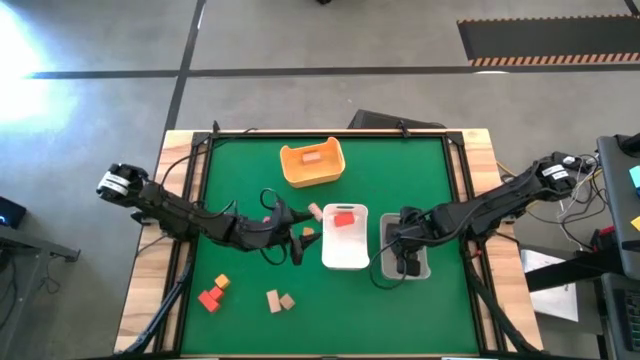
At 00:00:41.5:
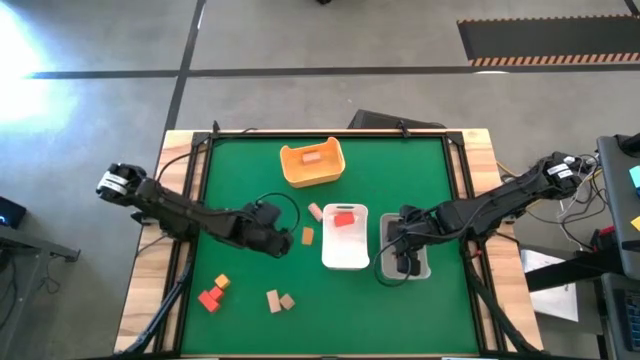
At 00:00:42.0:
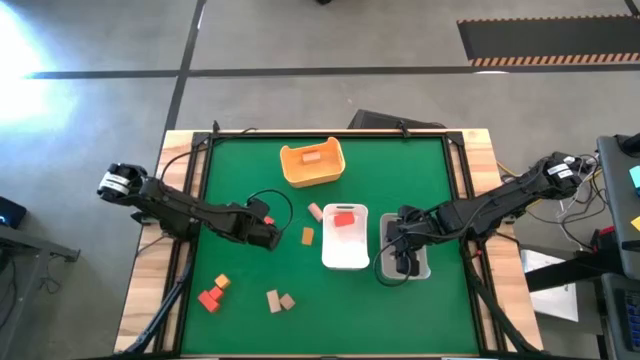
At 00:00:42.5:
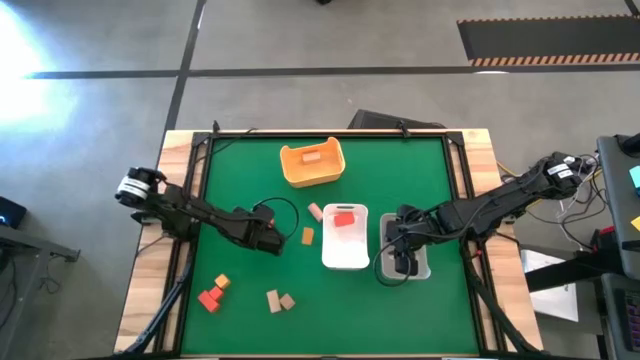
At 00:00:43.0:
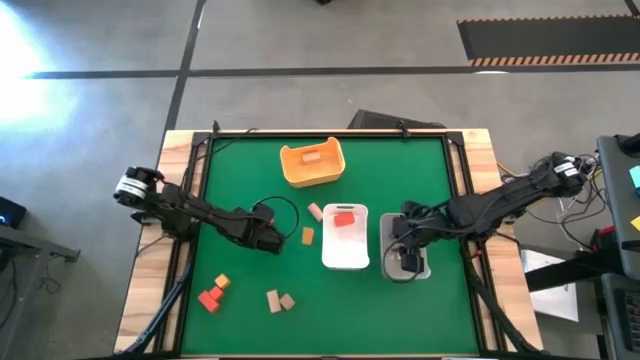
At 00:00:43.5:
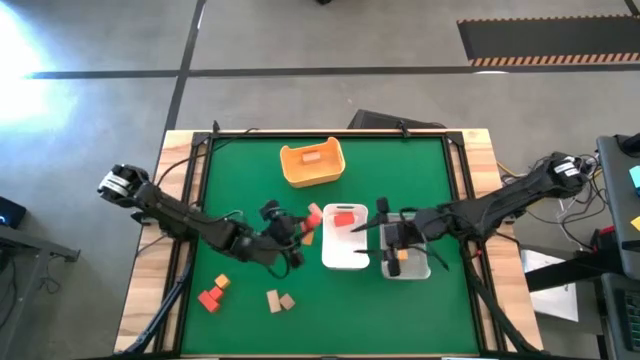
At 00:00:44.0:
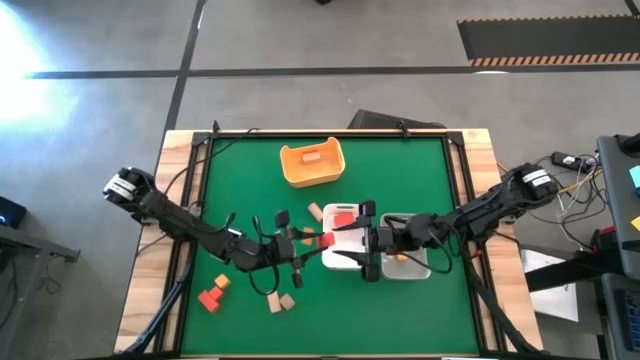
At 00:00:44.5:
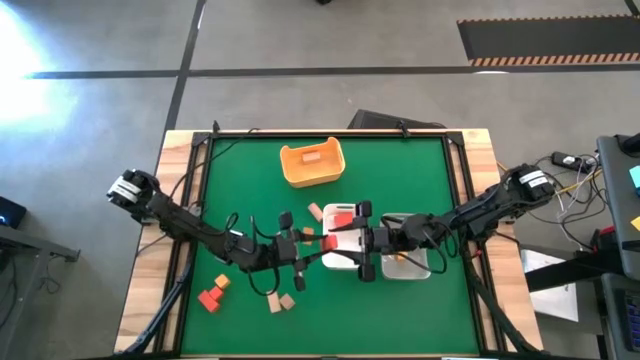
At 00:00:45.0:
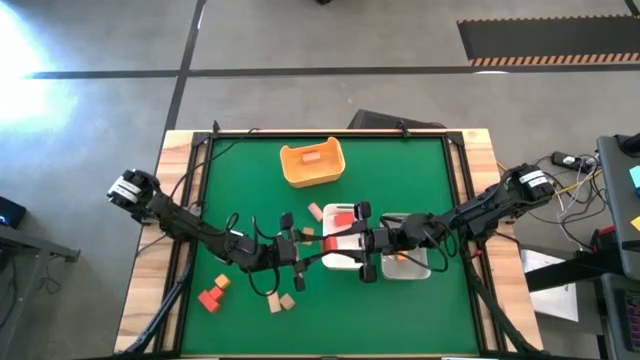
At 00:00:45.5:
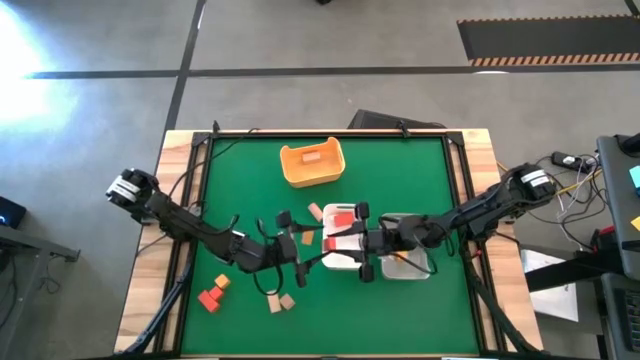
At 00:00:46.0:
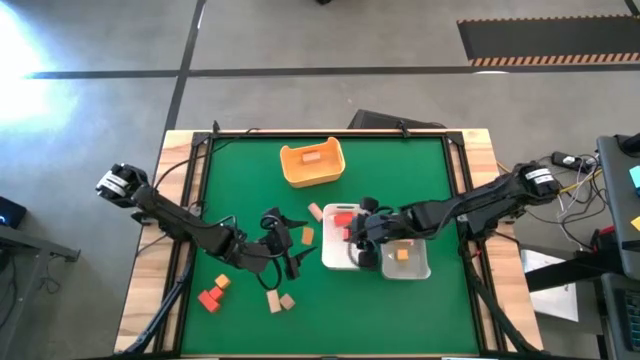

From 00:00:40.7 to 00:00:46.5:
Task: Sort & place blocks by color
Put the red block into the white bin

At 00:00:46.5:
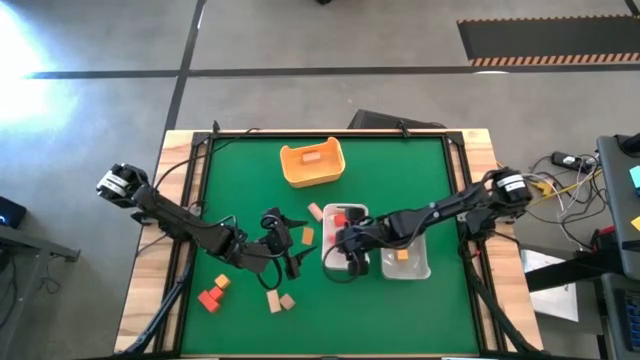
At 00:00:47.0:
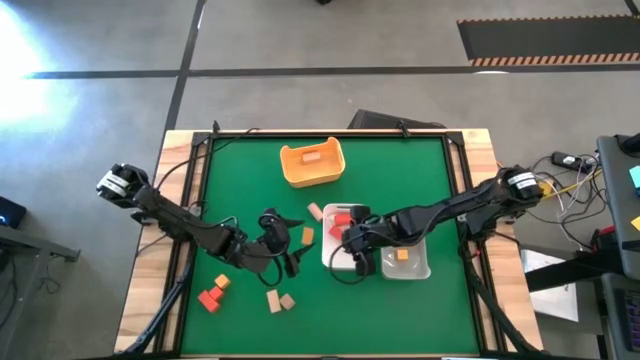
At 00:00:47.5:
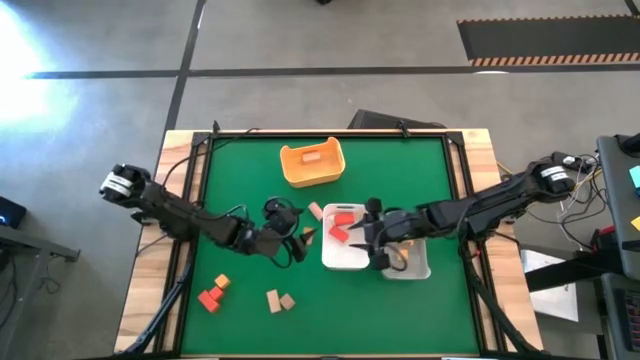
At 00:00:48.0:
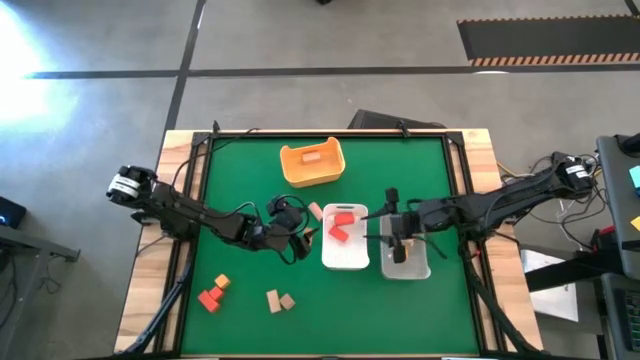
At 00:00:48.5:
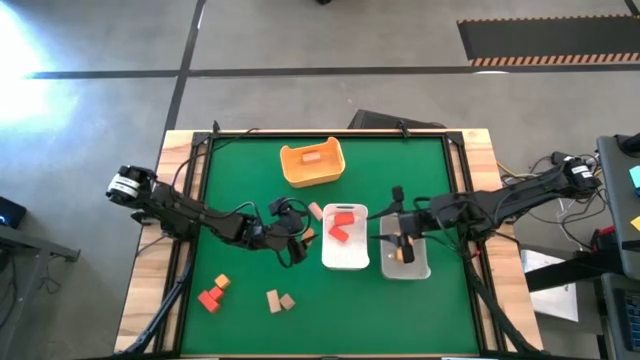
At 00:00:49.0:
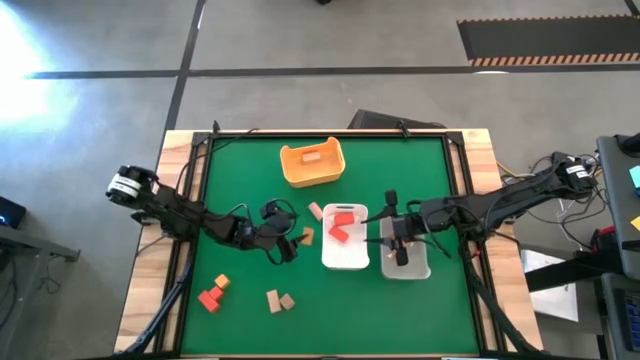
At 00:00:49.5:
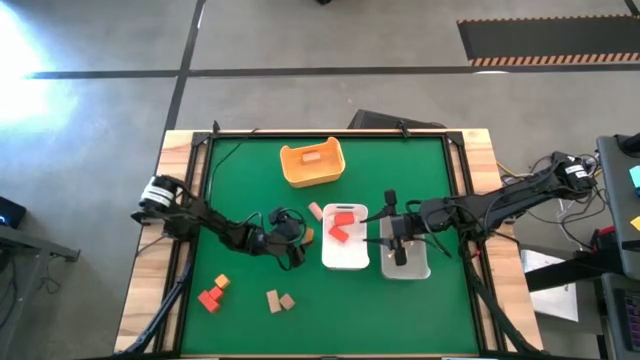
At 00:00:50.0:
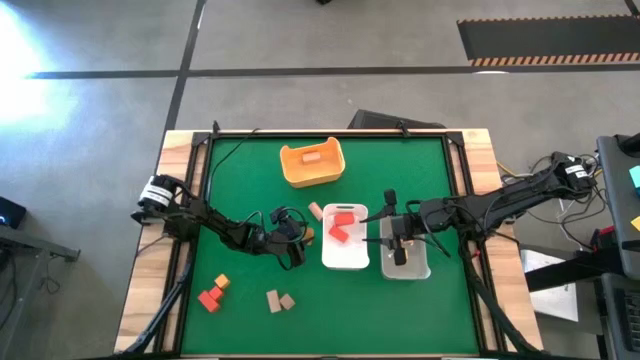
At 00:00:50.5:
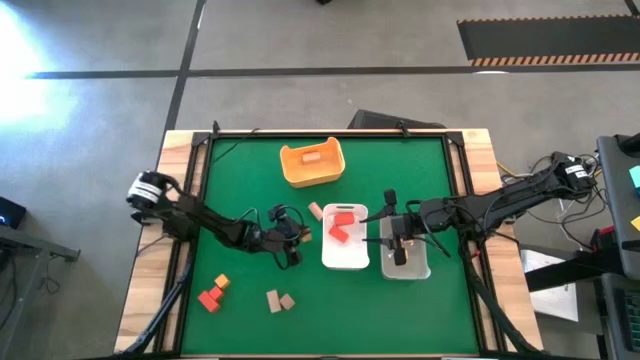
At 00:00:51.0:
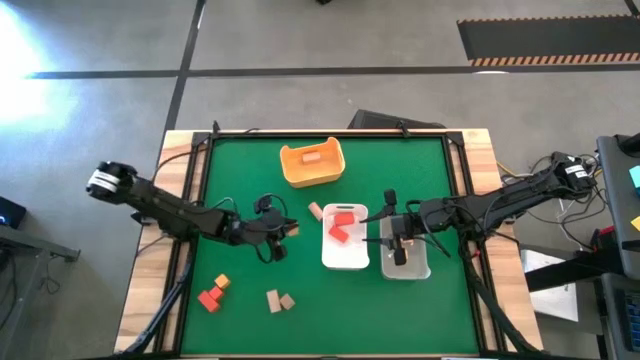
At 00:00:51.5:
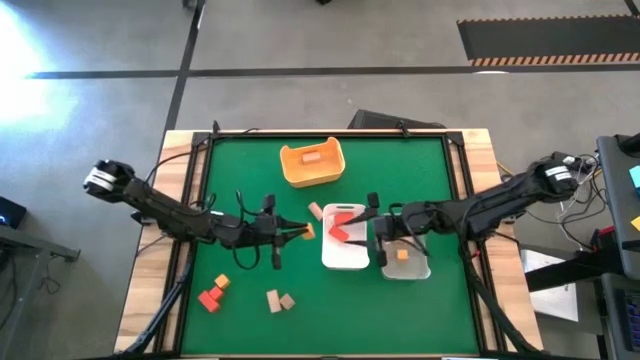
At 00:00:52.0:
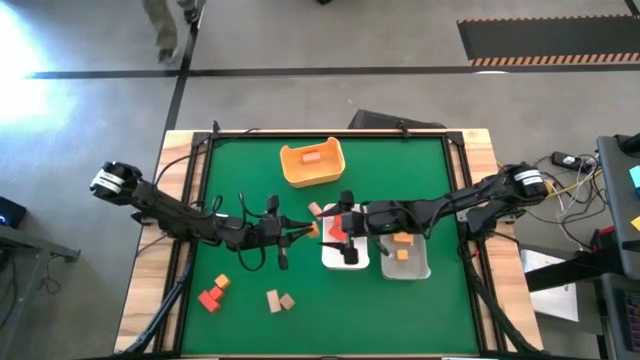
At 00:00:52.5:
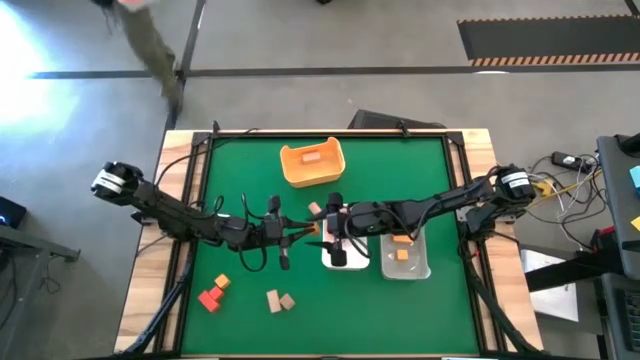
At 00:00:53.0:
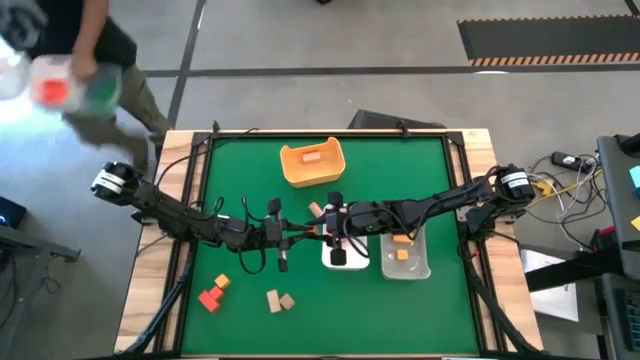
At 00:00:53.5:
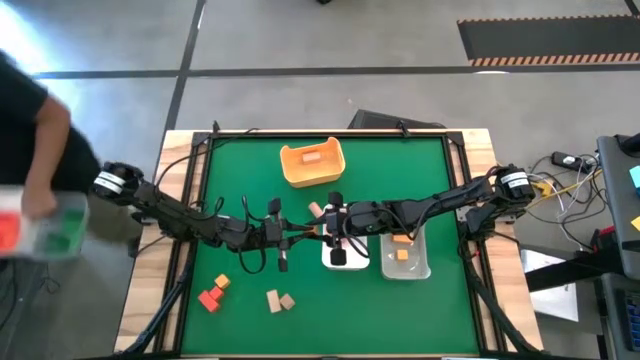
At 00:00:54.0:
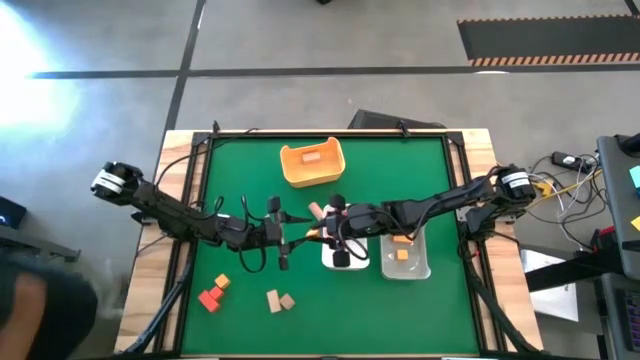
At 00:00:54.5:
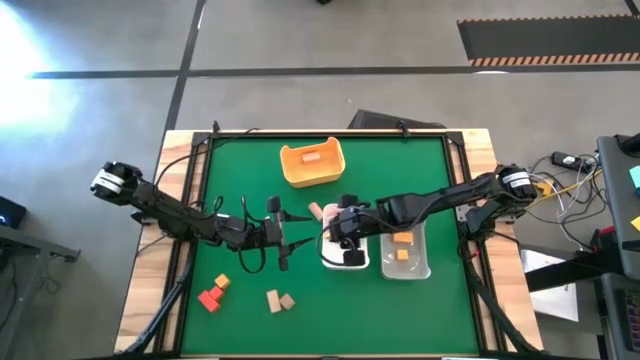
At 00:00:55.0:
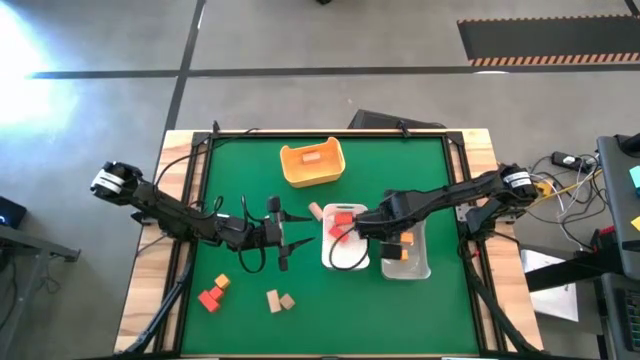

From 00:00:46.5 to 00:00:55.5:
Put the yellow block into the gray bin

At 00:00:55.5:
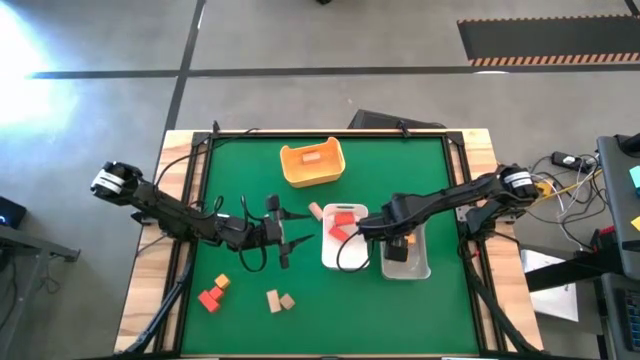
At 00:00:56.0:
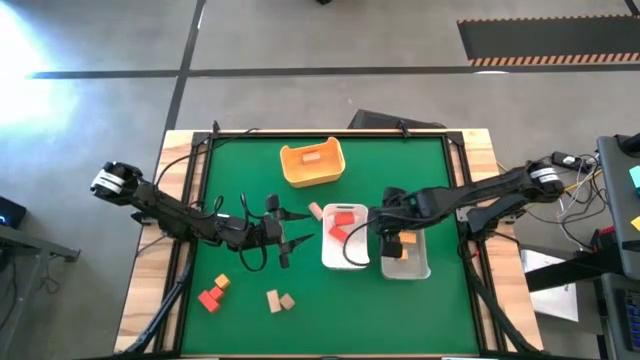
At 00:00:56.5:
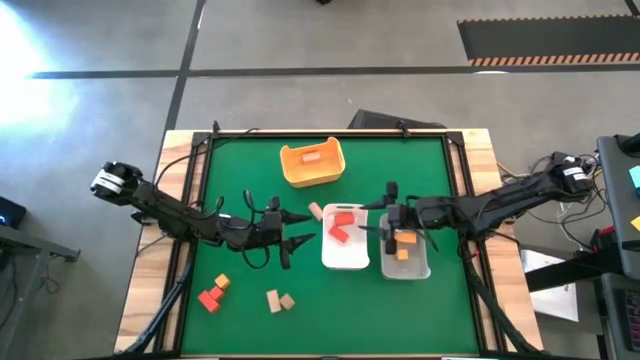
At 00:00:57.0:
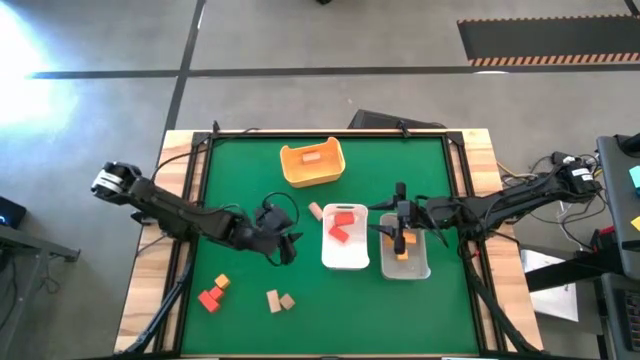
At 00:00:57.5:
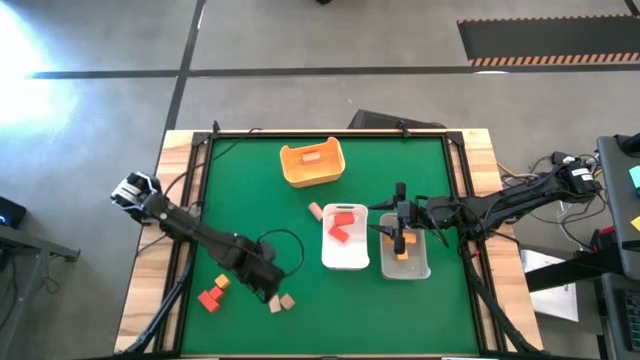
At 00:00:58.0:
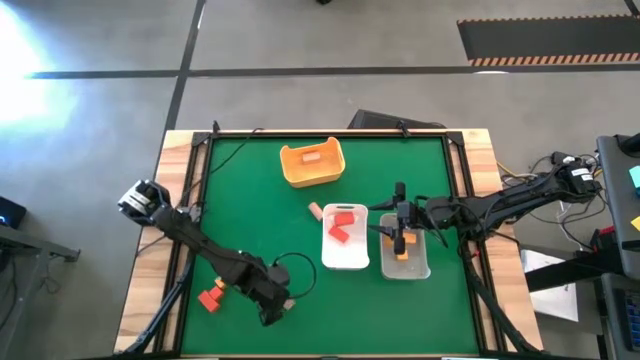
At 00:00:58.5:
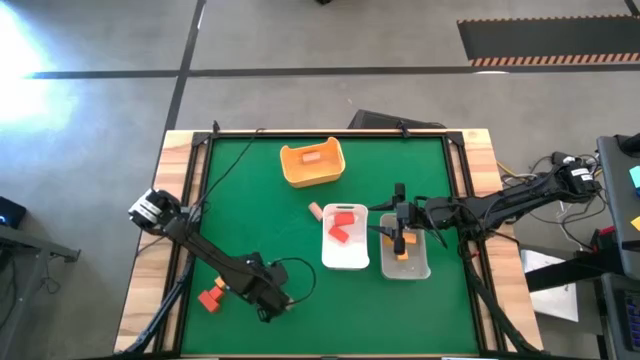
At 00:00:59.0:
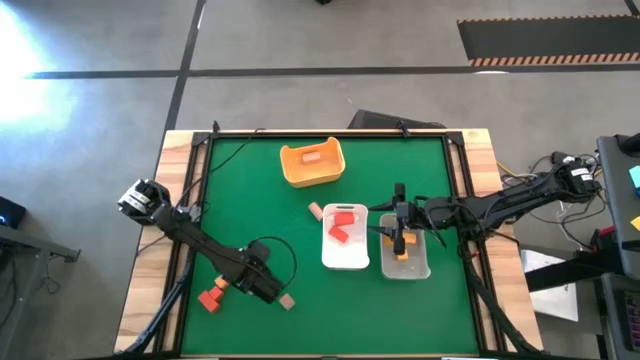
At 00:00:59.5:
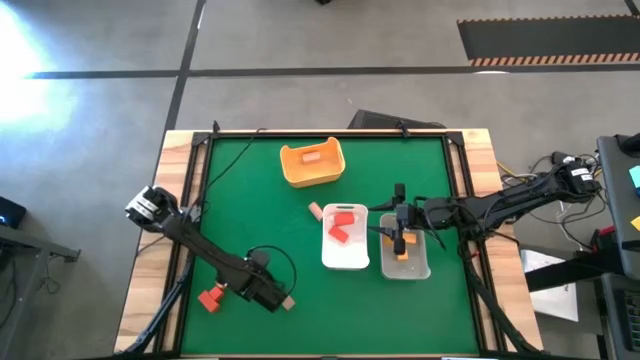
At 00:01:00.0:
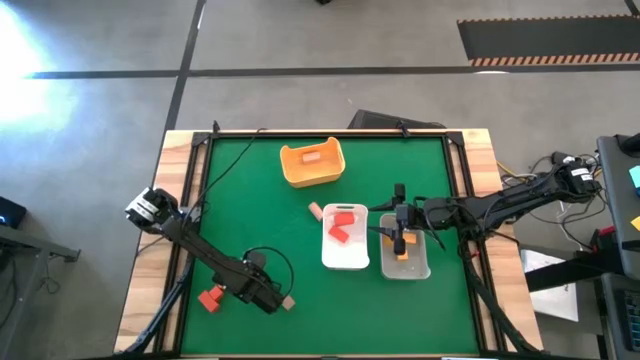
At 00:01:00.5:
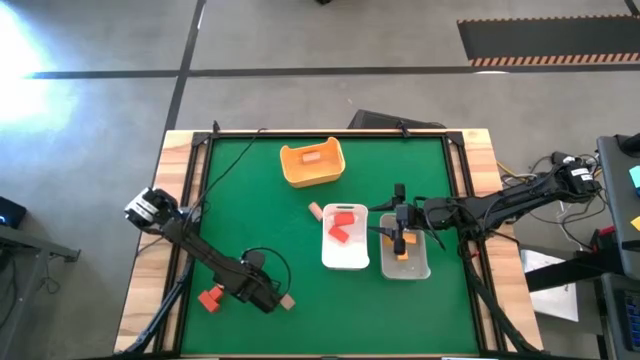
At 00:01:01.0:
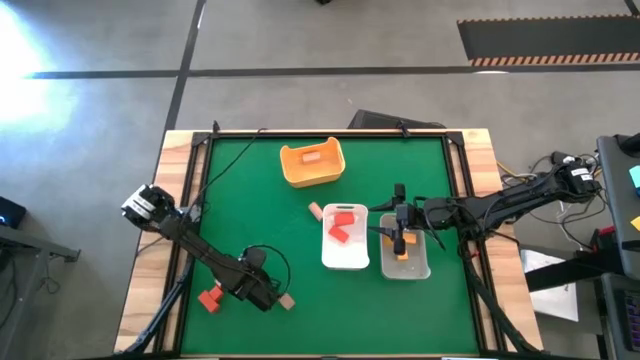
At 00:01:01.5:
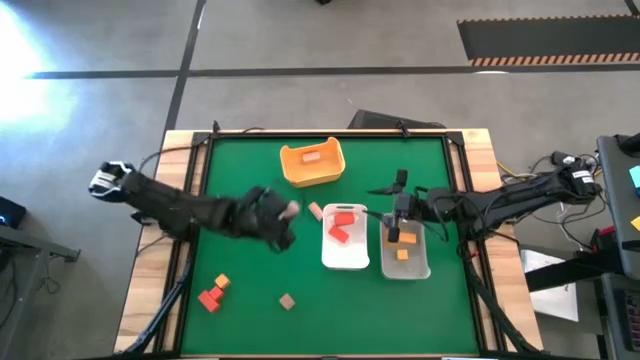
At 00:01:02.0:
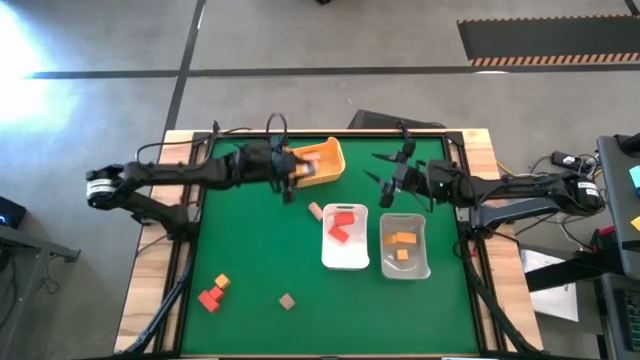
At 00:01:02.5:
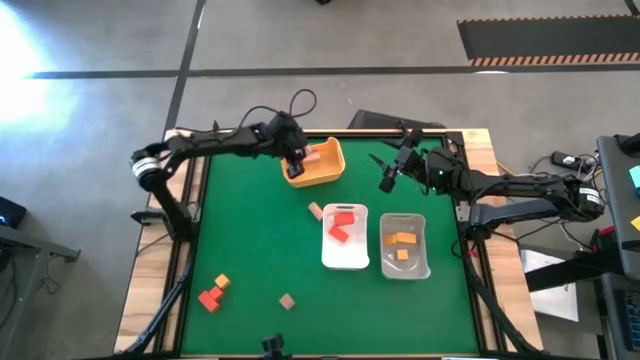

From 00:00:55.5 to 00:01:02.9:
Put the brown block into the yellow bin
